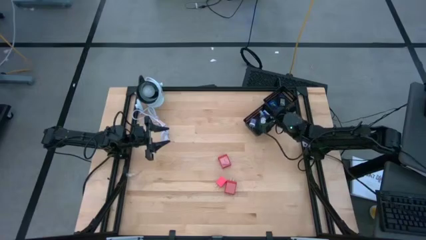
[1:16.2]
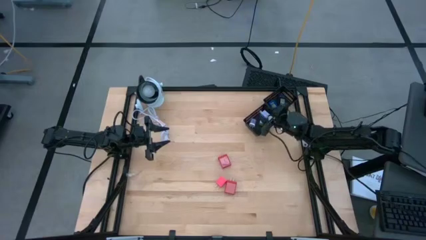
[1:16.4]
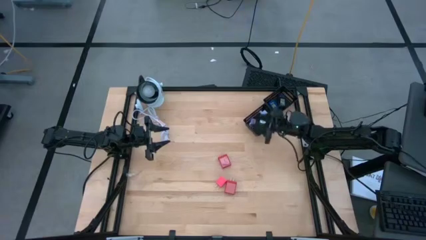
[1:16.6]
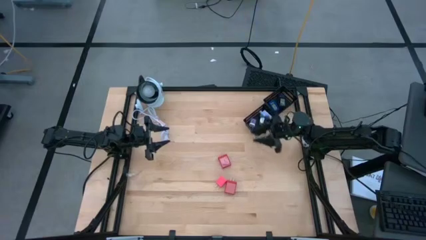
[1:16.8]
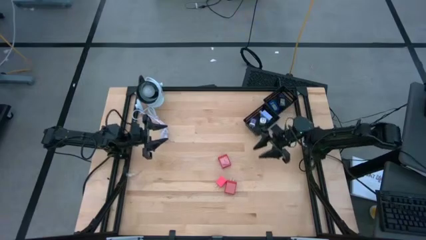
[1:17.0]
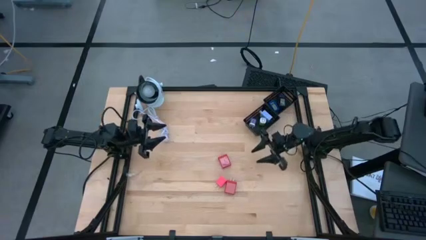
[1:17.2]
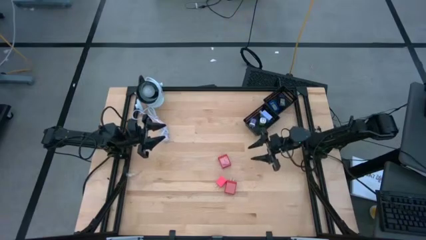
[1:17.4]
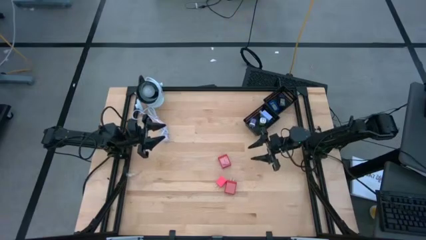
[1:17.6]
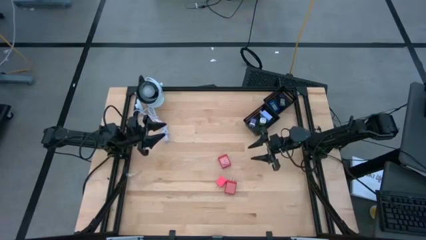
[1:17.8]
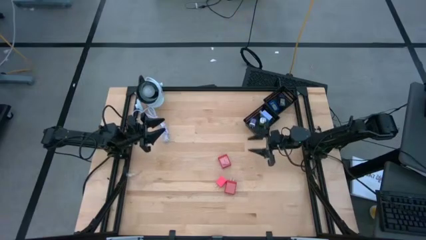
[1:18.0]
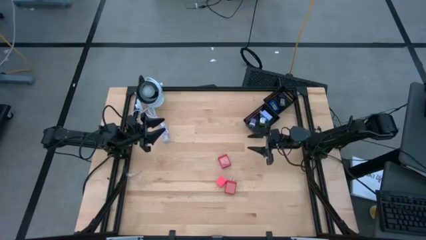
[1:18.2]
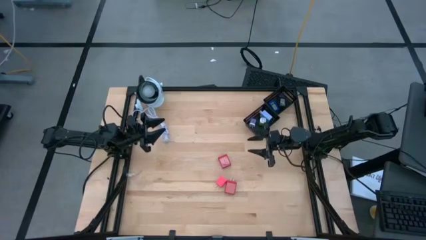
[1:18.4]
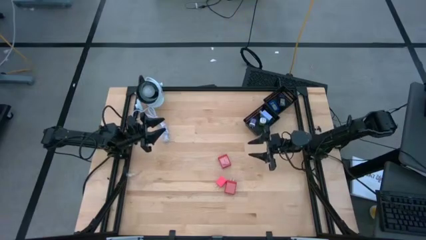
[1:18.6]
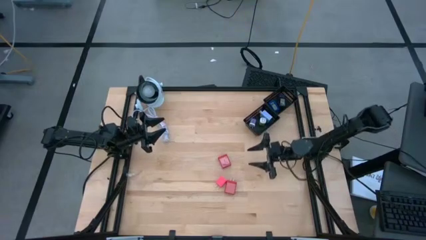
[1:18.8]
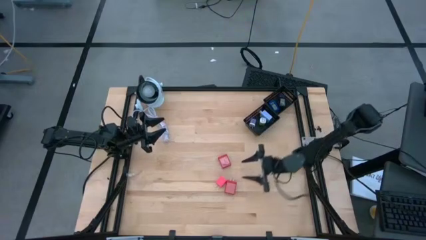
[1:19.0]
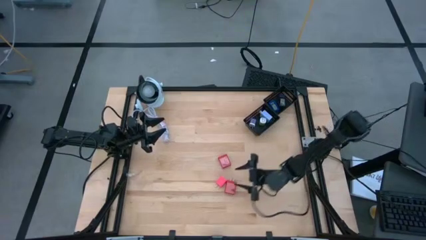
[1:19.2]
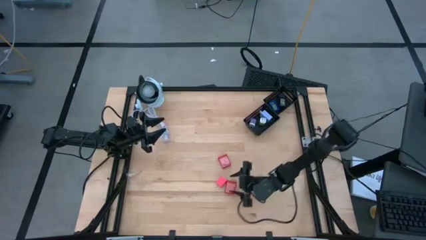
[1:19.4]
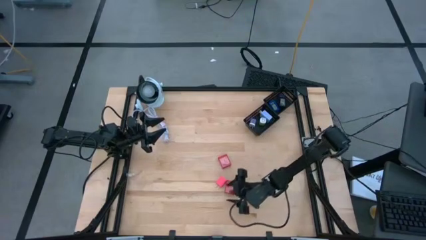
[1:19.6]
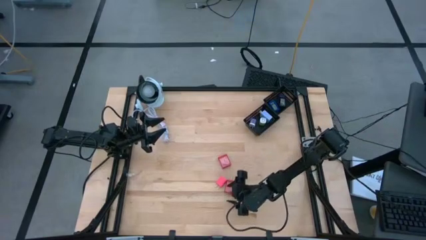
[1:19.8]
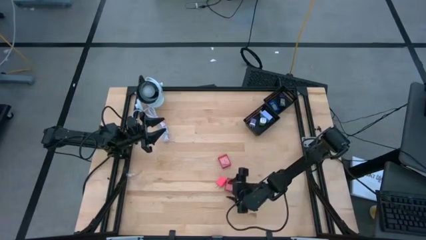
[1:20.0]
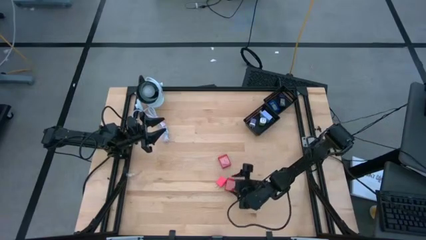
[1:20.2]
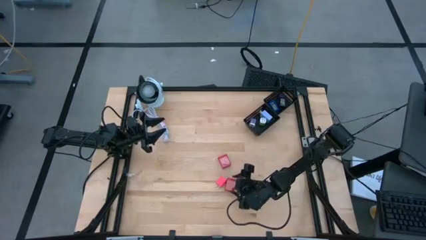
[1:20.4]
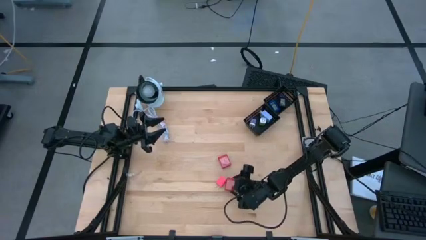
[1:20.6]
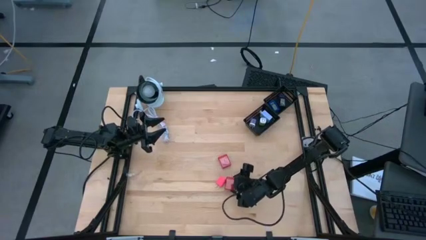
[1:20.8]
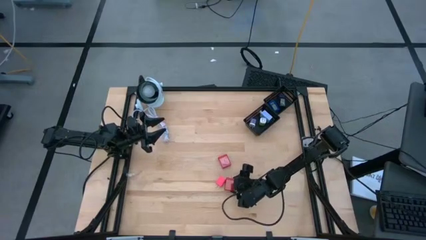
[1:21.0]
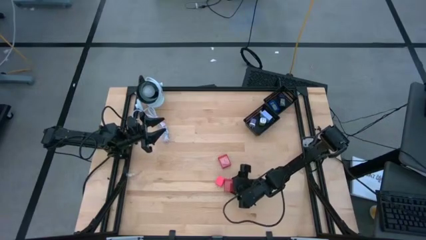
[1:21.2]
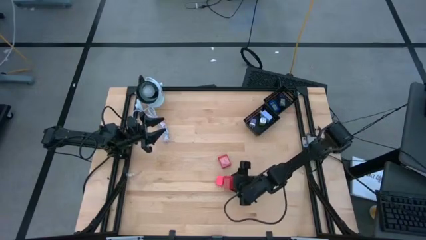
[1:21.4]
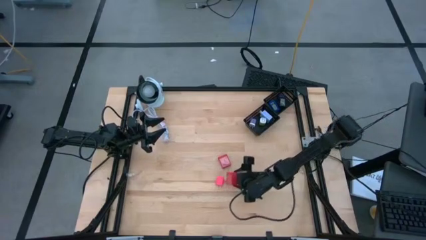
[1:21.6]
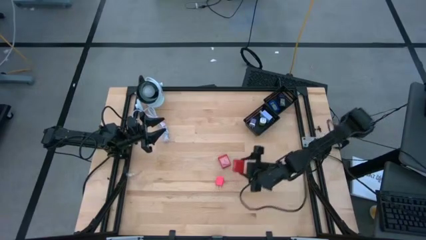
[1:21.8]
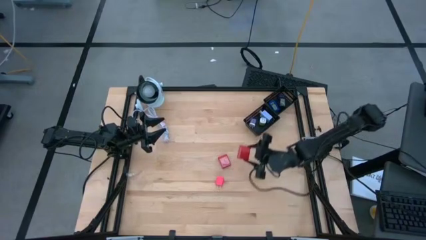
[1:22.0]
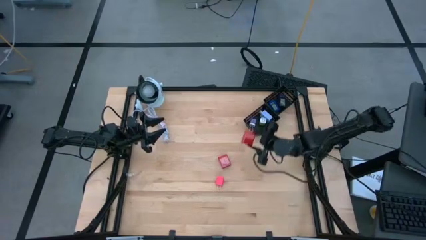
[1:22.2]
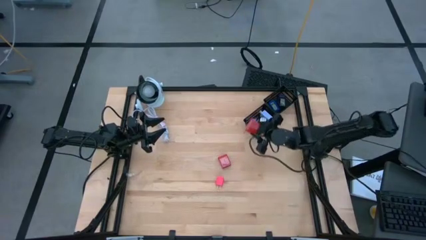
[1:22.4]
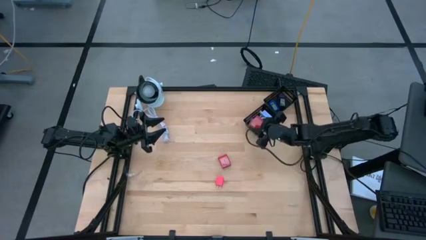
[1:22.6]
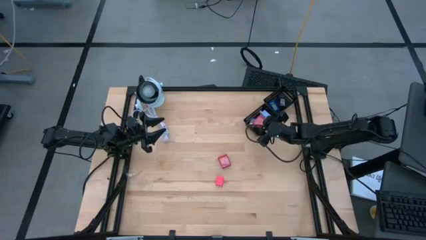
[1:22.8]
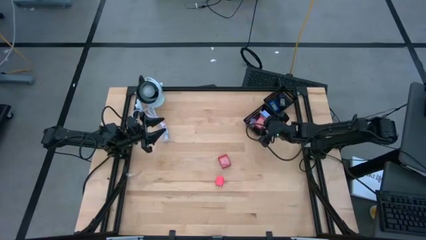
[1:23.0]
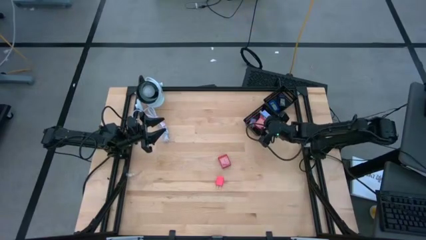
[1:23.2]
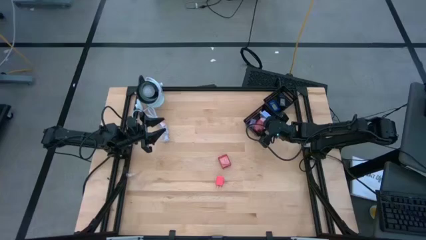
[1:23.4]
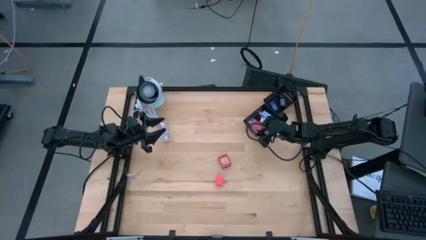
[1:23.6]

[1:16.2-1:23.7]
Task: Pick & Place Office items
Put the big red charger adapter into the bottom black bin

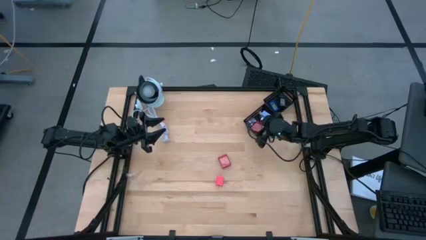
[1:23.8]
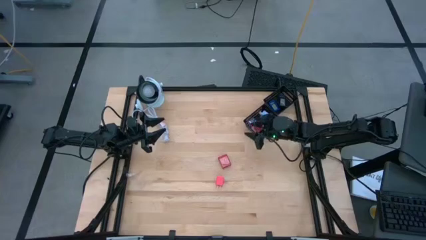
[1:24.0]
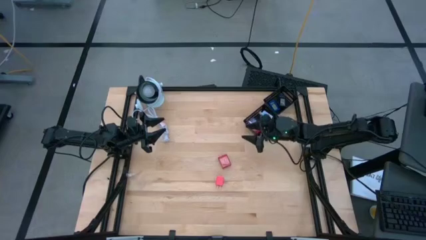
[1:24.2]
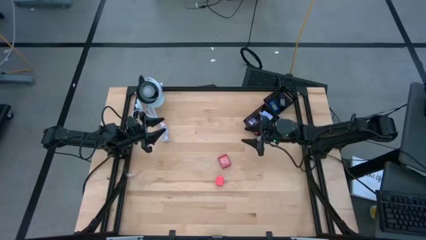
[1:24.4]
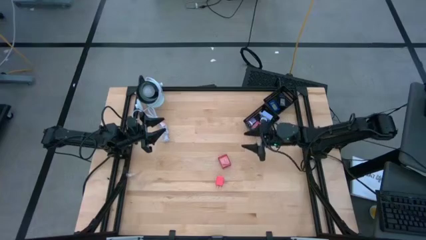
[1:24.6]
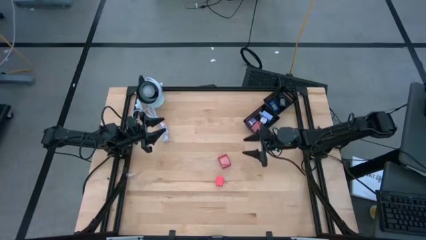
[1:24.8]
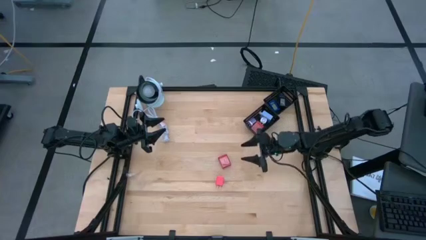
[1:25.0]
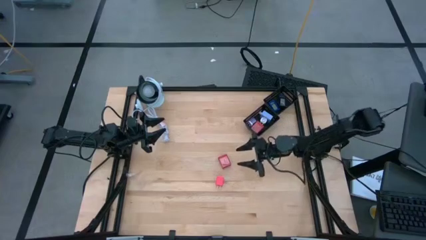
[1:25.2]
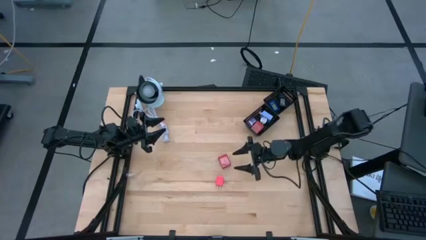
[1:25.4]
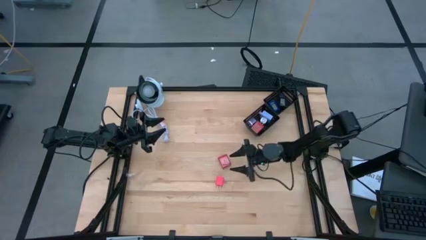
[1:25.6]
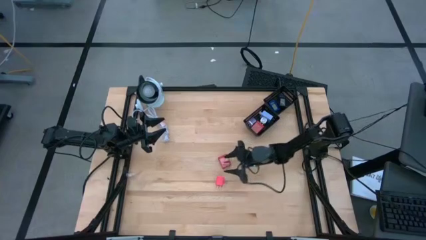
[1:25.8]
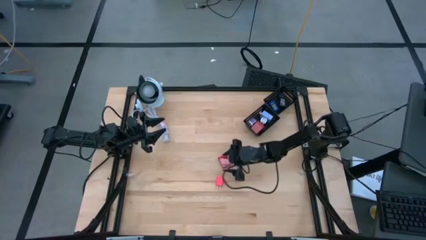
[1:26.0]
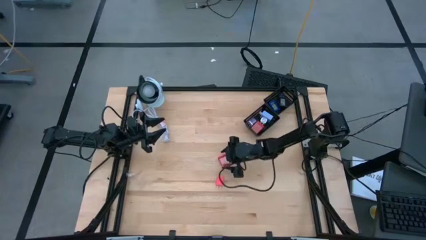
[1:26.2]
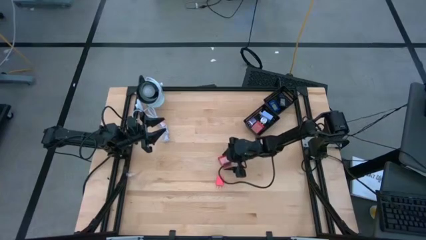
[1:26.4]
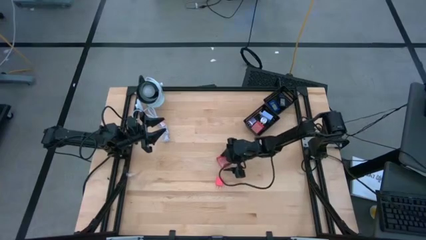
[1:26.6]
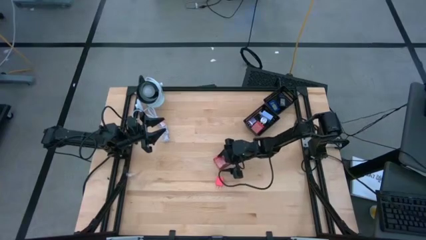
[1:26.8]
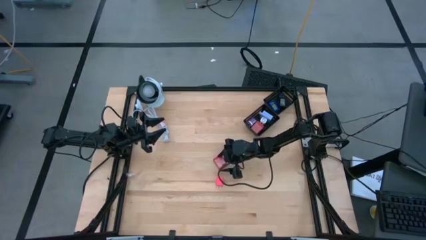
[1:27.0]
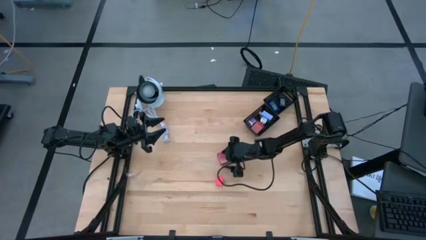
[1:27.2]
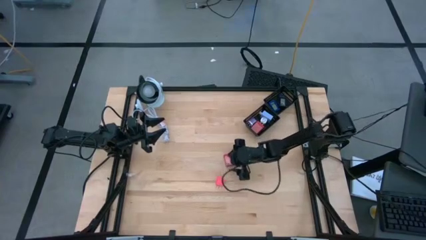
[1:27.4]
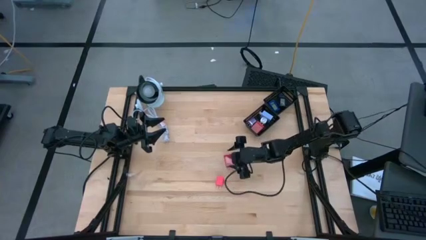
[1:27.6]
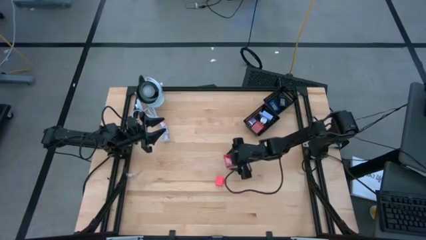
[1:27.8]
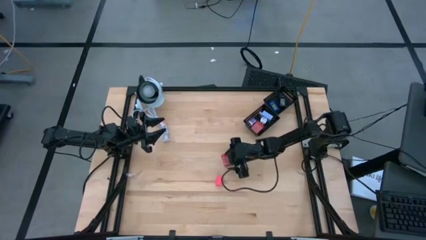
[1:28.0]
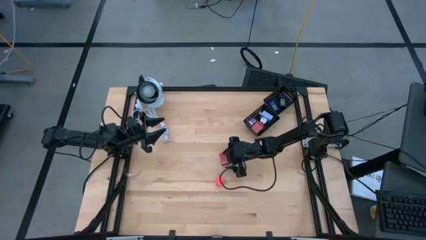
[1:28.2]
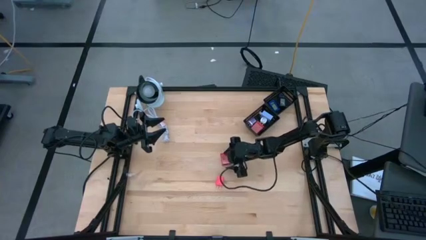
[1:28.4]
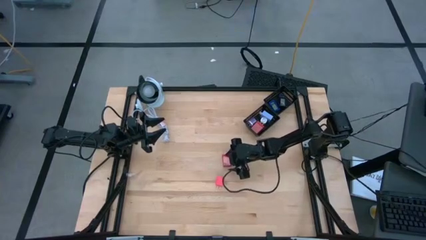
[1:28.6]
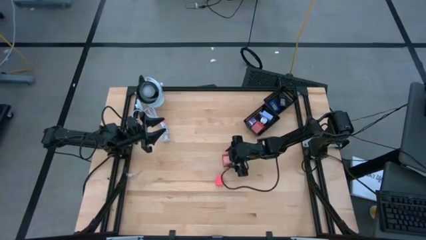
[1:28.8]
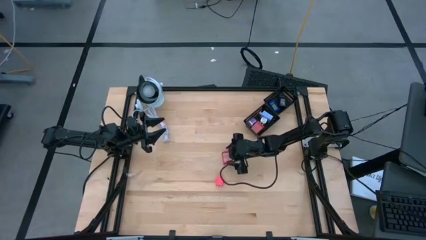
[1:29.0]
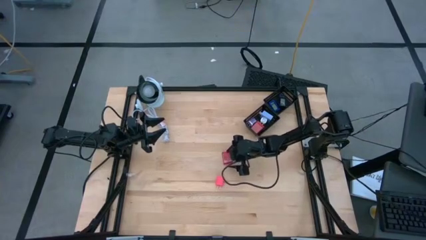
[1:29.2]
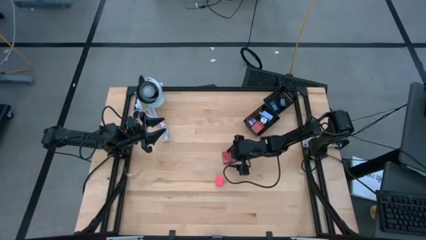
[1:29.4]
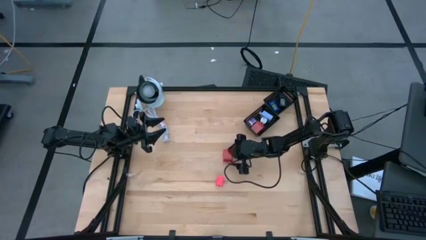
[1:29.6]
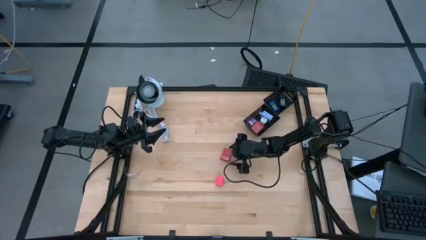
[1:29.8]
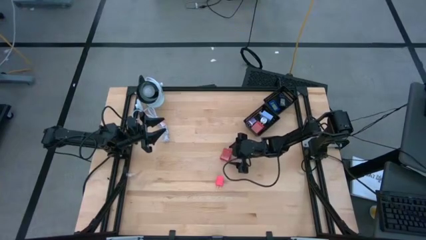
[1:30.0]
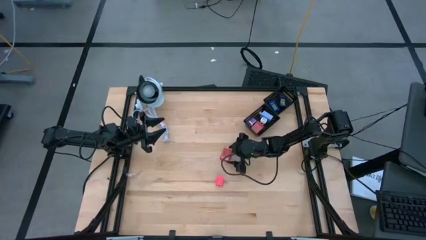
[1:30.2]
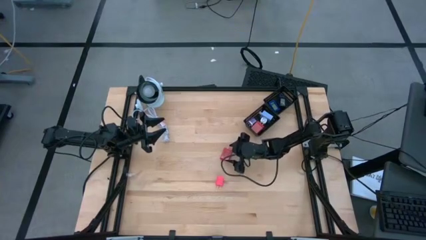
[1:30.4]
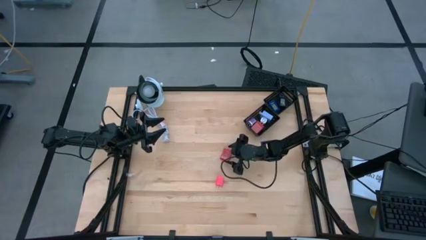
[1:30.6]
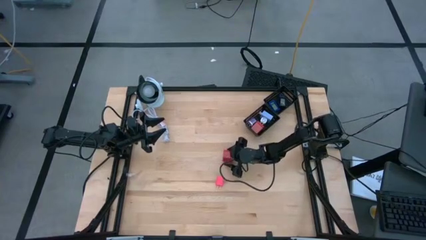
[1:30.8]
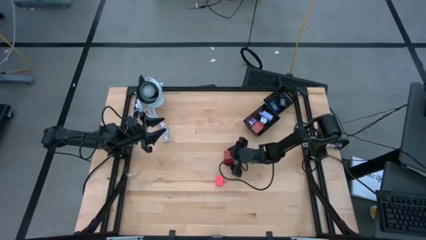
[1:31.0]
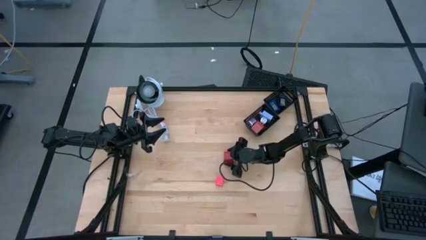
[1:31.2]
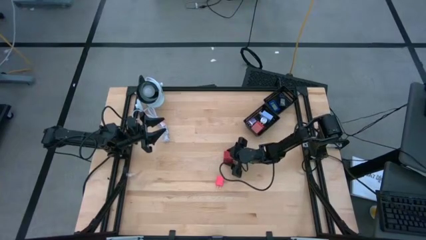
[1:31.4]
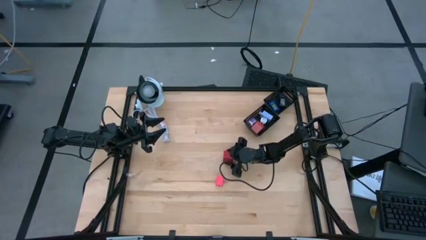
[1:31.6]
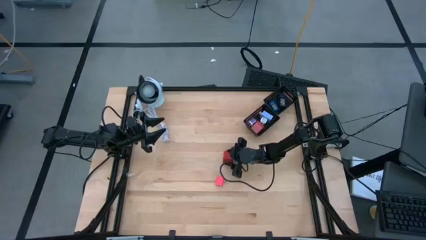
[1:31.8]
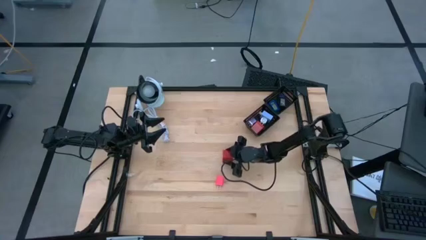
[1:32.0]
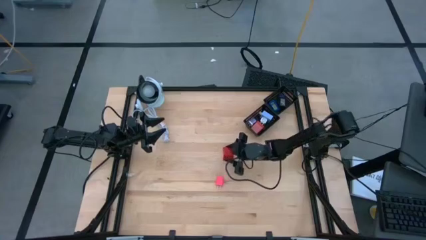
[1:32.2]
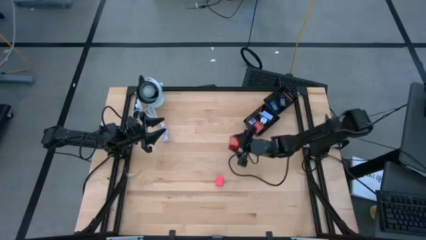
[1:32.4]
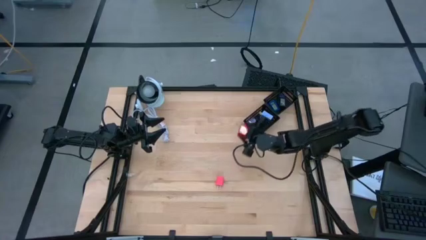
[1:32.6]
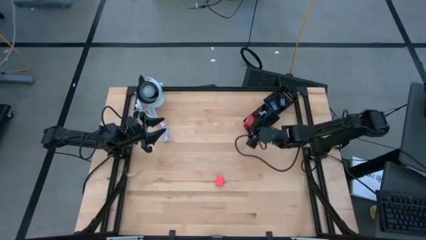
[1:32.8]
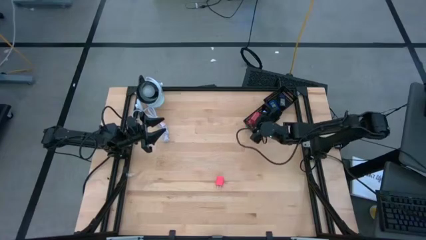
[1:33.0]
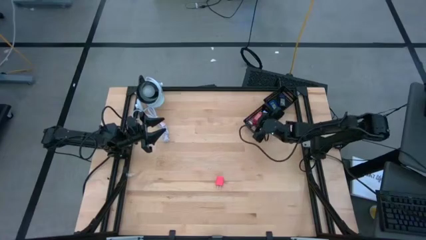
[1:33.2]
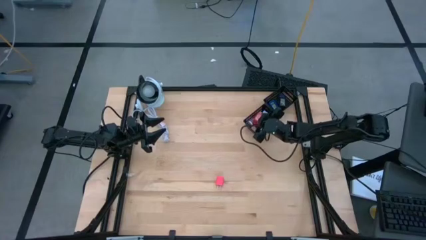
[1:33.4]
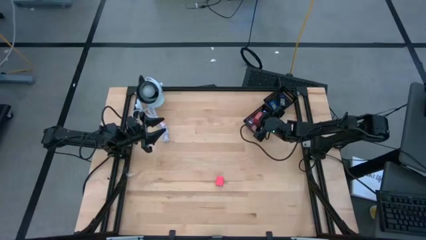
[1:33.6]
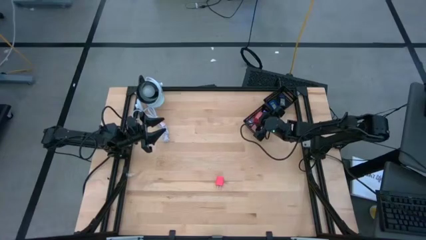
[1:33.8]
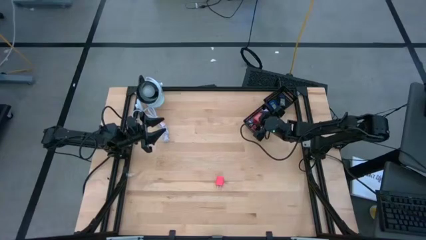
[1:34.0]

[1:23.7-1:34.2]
Put the big red charger adapter into the bottom black bin
